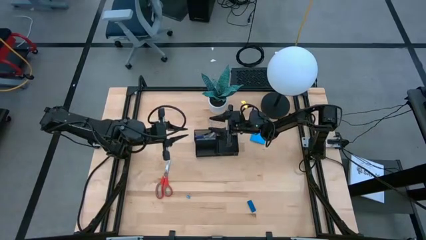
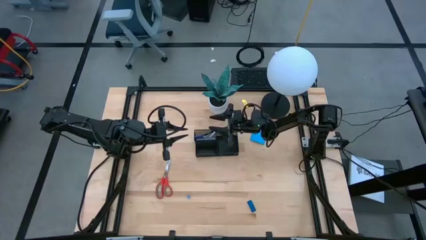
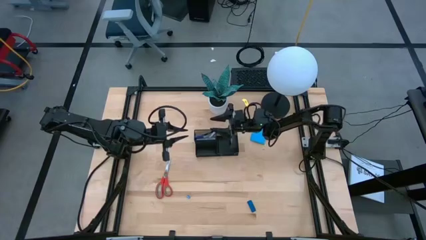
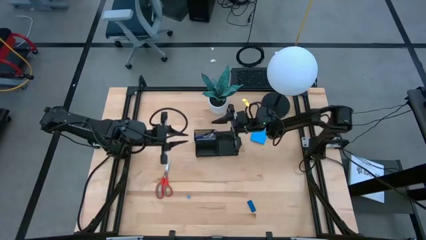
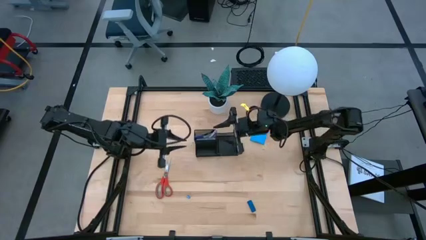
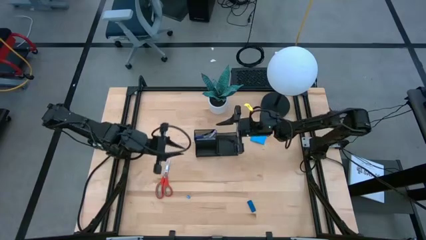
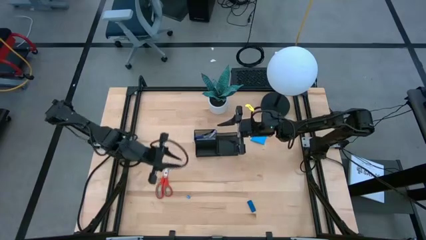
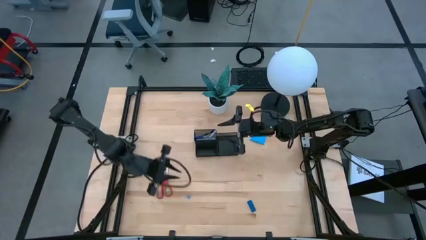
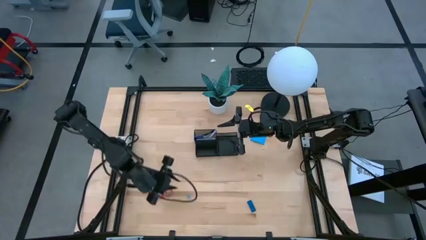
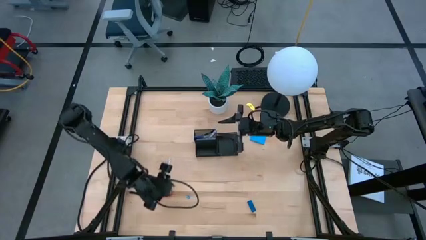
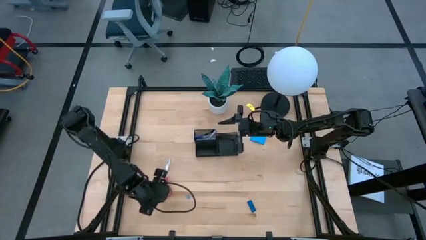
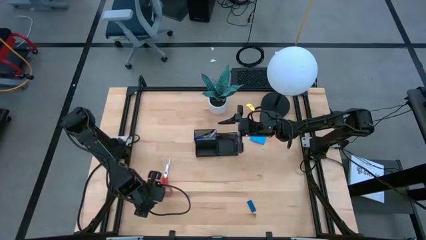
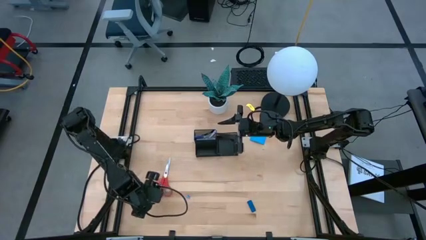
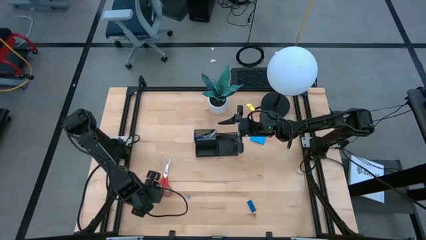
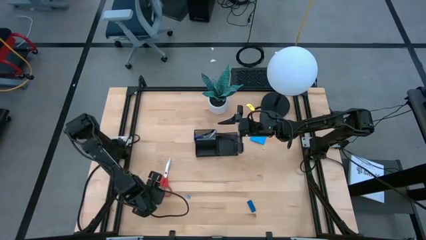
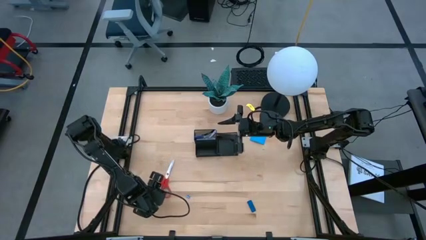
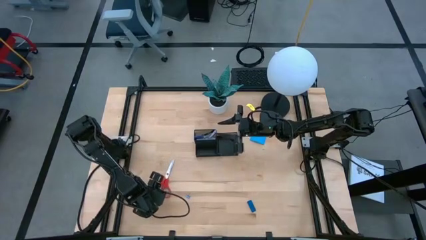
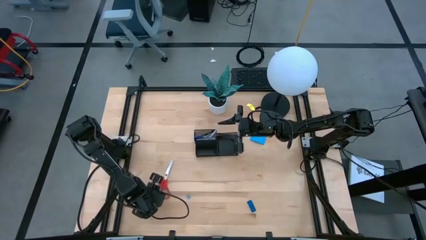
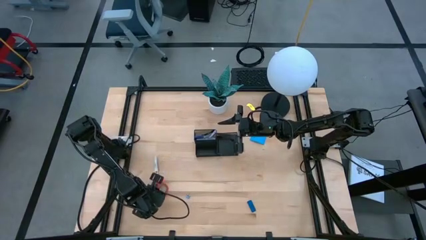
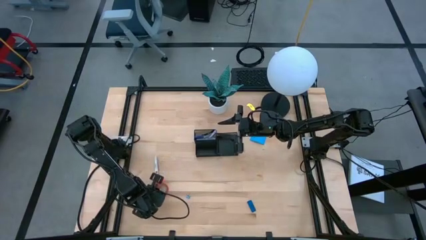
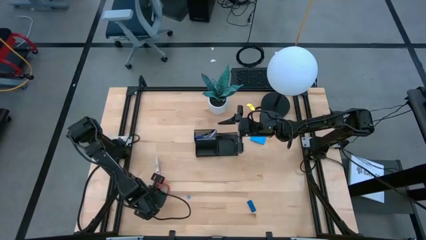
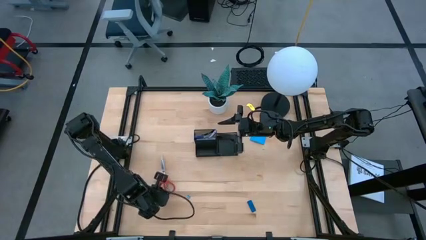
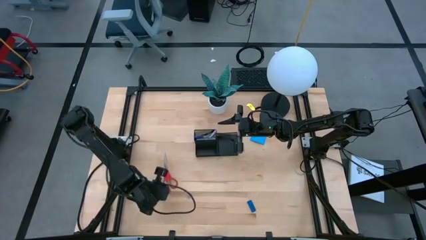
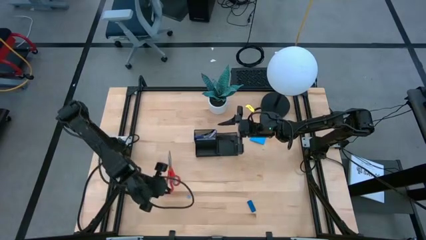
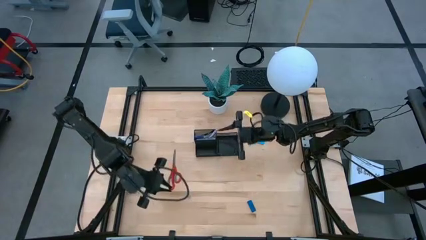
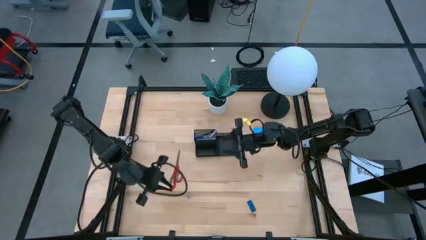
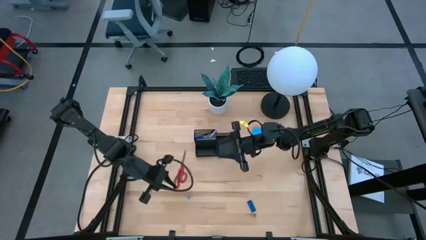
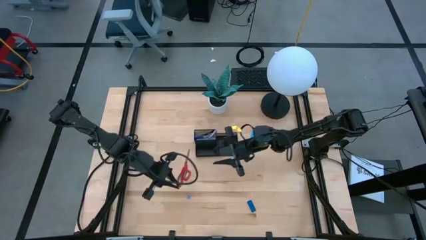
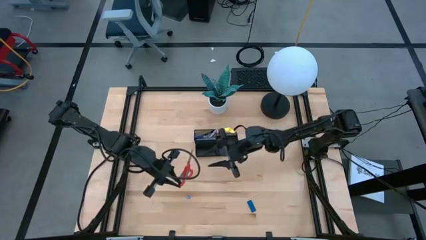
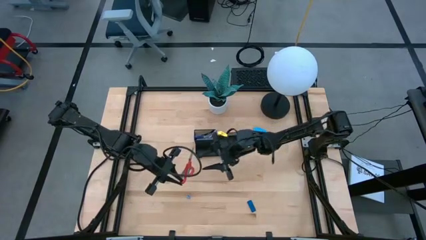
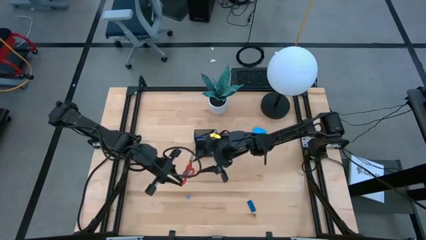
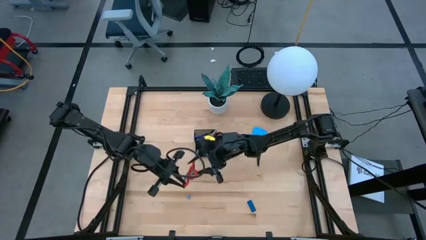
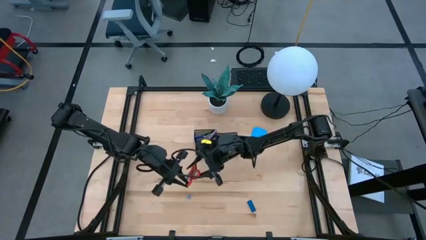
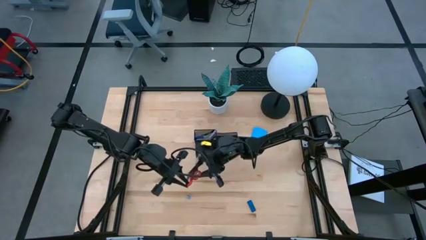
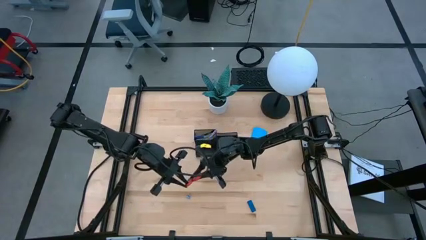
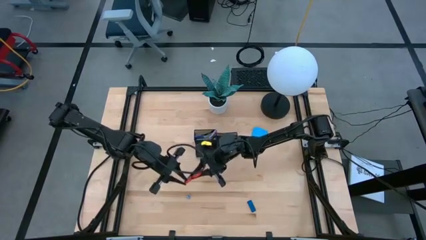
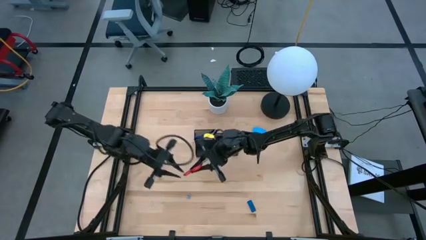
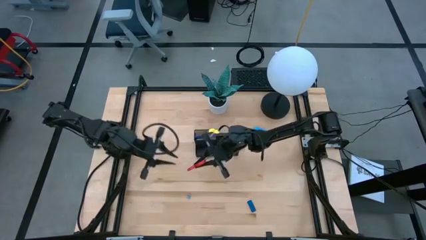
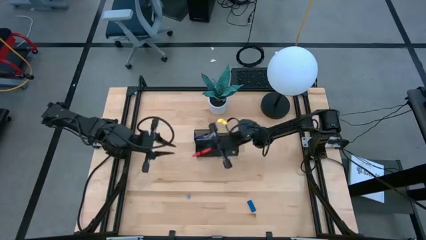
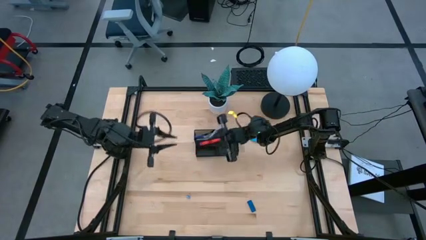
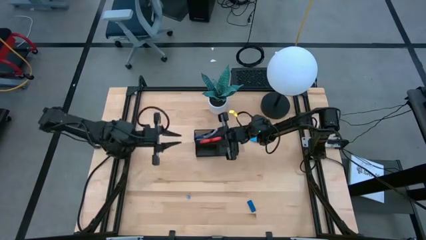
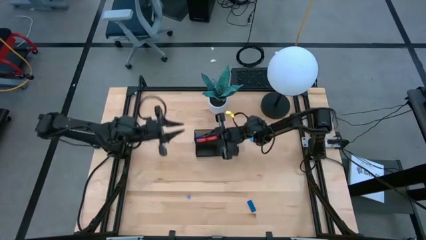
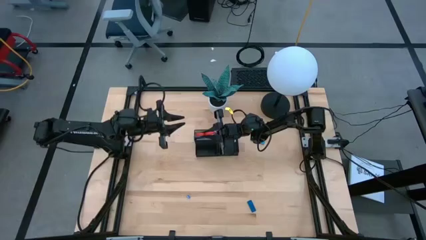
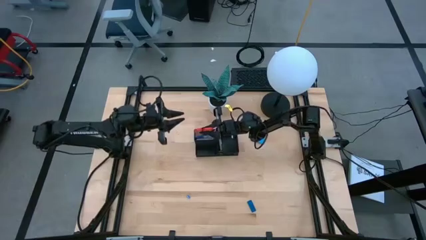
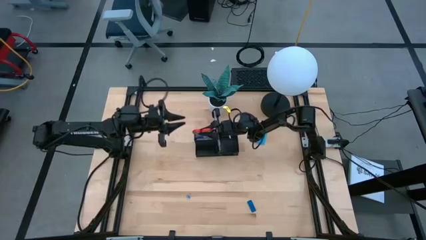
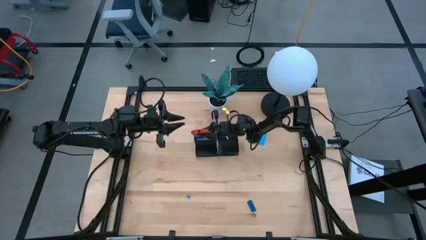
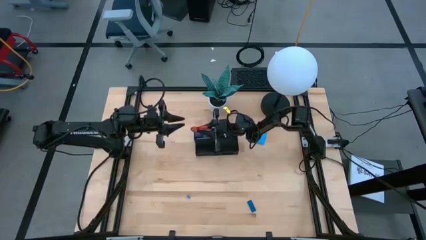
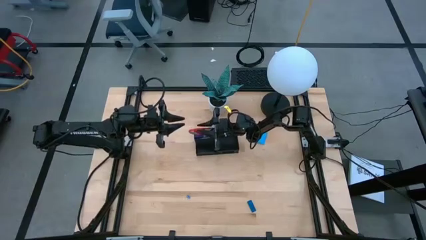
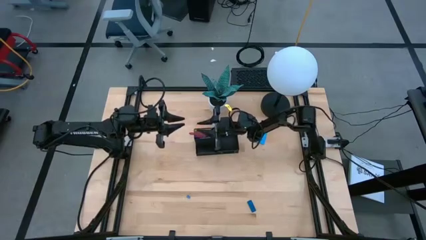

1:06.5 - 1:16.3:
Task: Pick and place office supplies into organizer
Put the red scissors into the top left section of the desk organizer

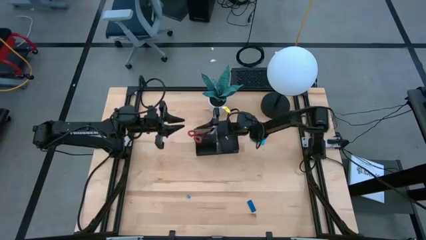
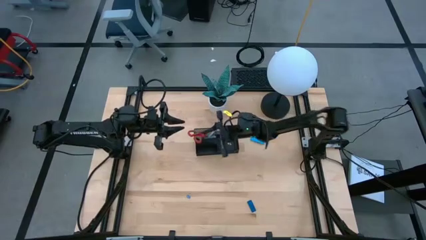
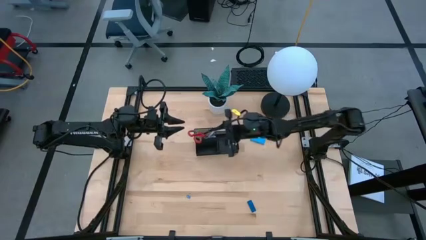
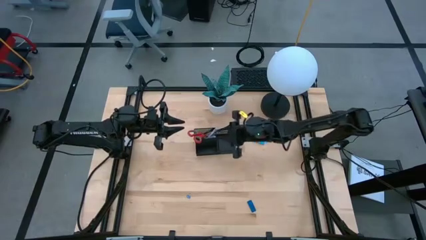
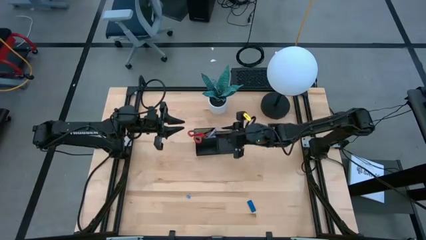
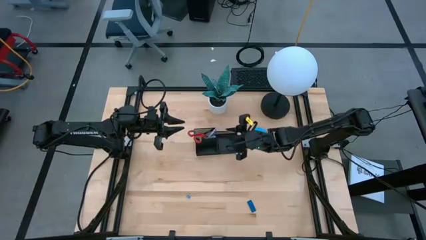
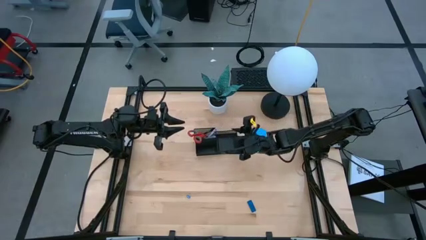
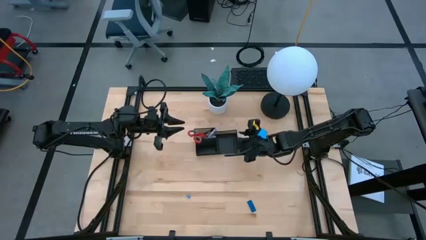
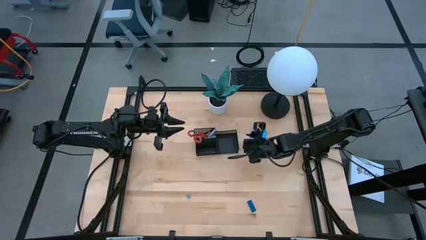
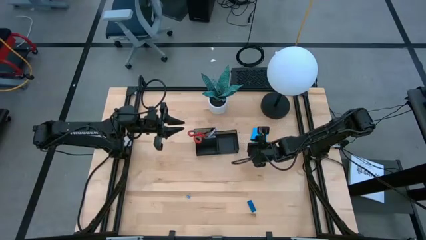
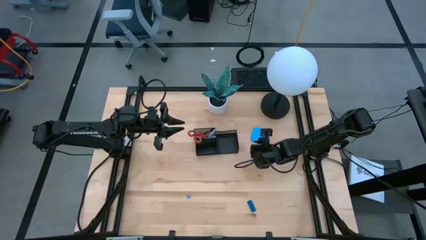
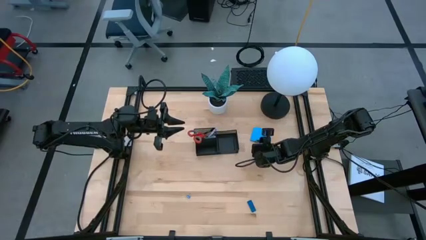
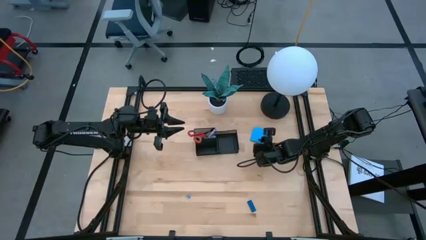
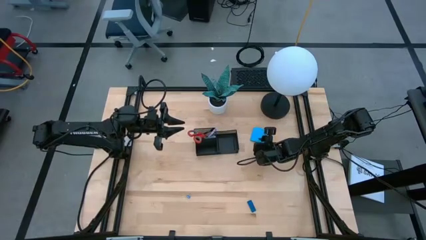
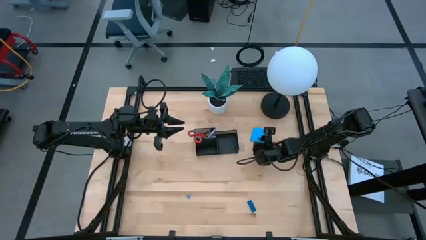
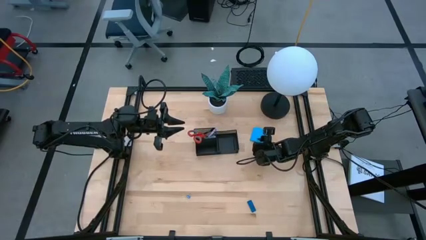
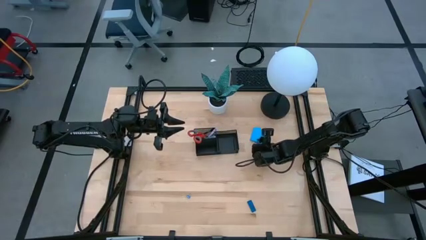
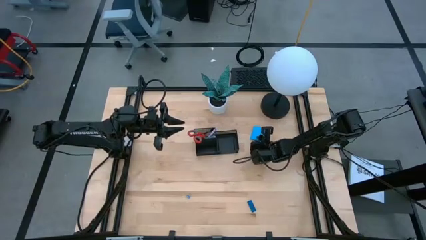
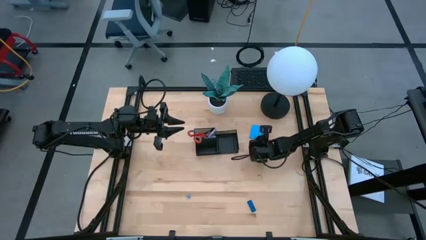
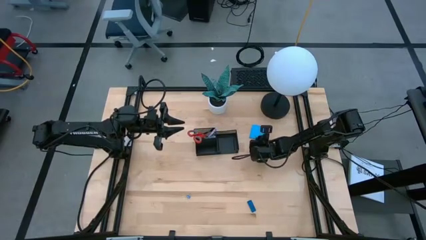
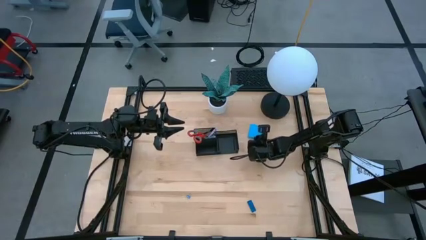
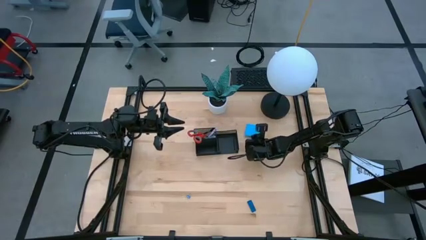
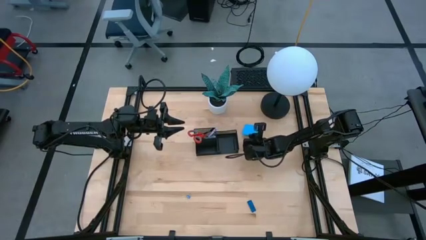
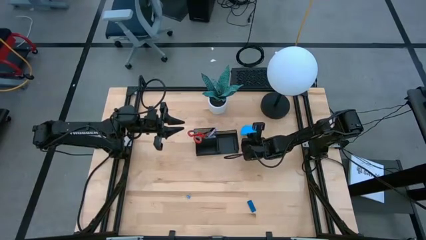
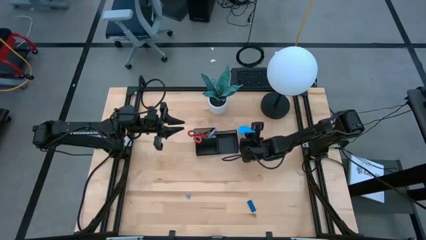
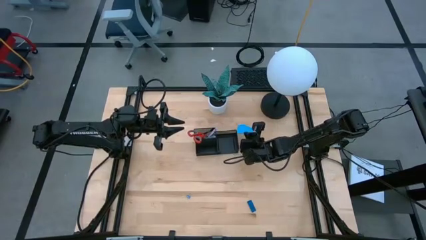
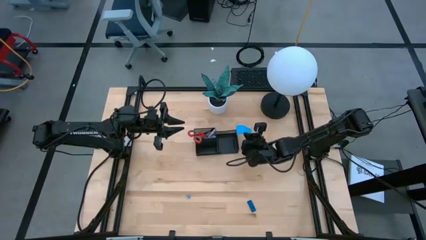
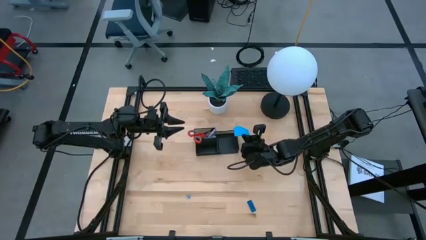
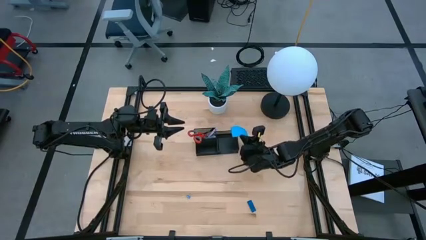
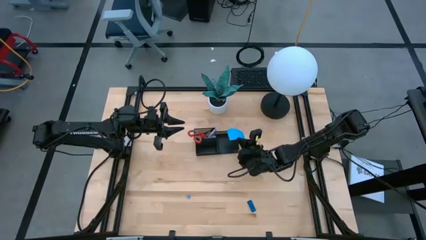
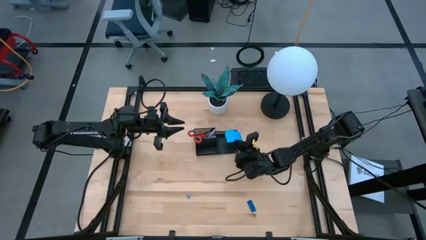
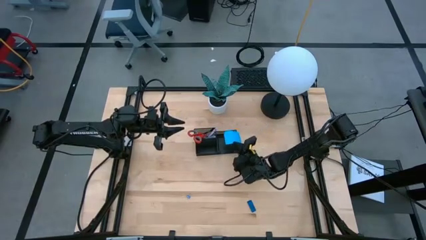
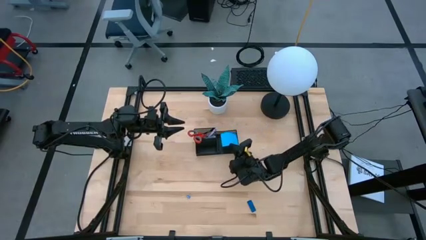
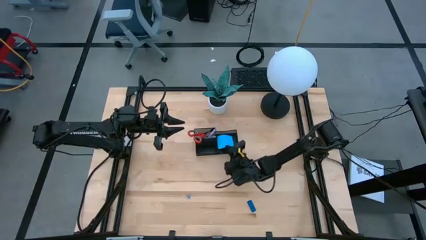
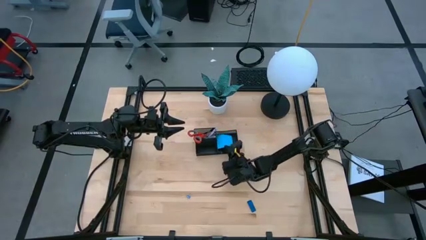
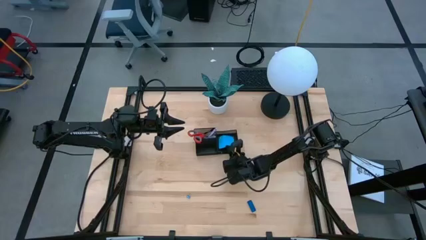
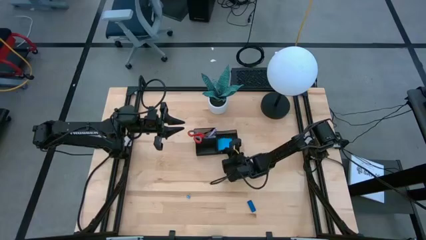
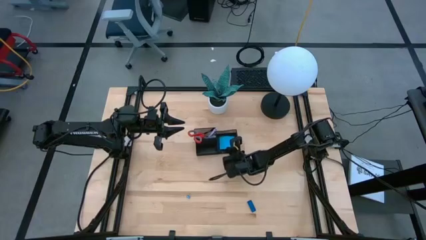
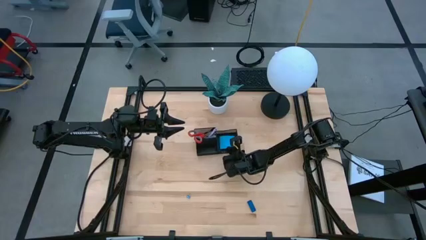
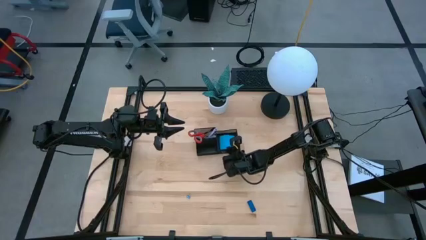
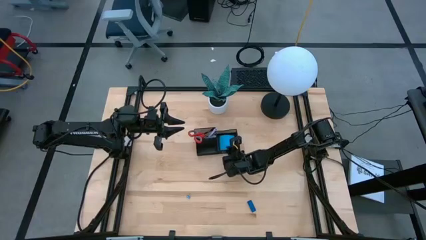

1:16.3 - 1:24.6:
Put the blue sticky notes into the right section of the desk organizer
